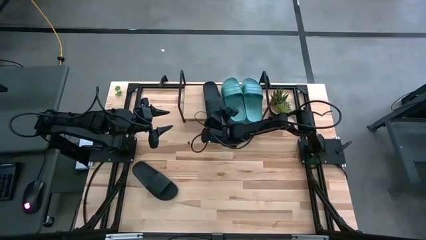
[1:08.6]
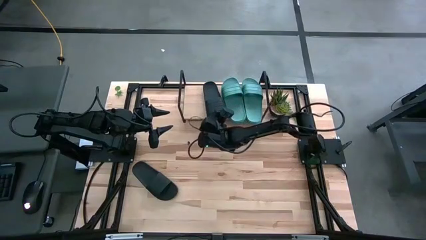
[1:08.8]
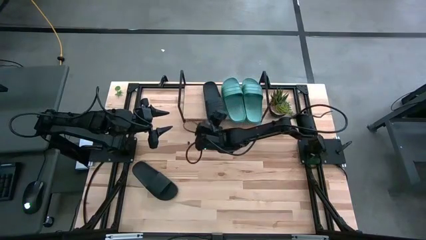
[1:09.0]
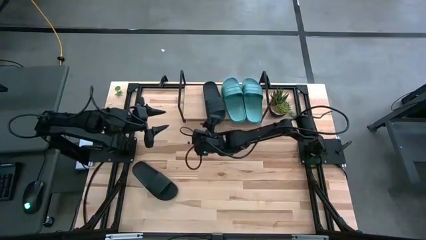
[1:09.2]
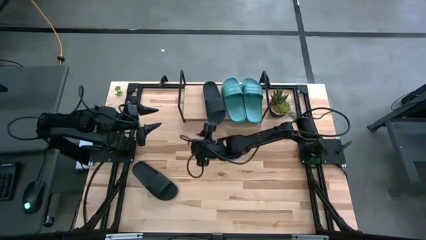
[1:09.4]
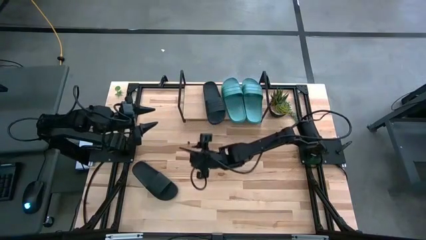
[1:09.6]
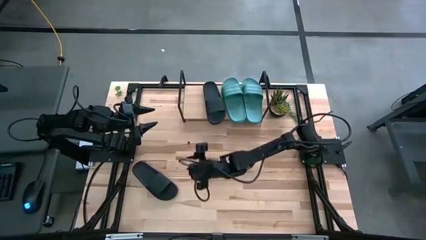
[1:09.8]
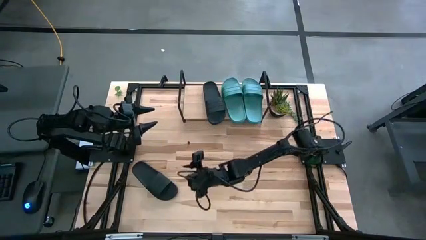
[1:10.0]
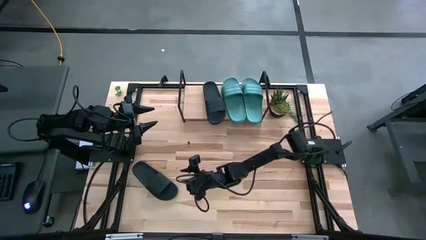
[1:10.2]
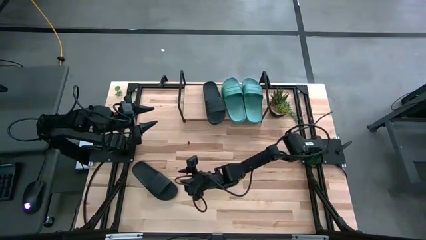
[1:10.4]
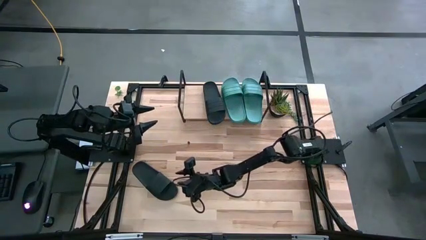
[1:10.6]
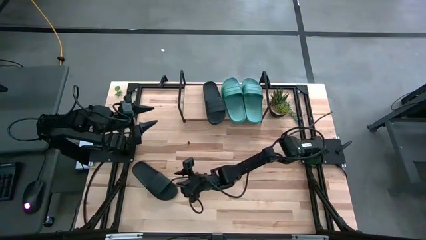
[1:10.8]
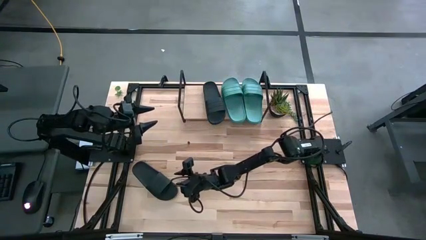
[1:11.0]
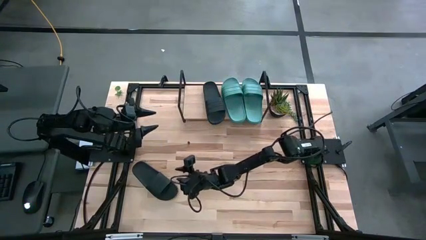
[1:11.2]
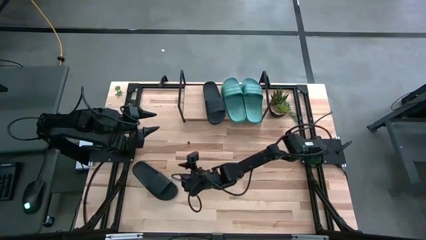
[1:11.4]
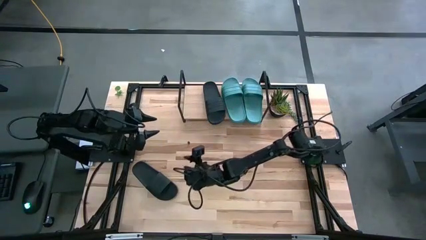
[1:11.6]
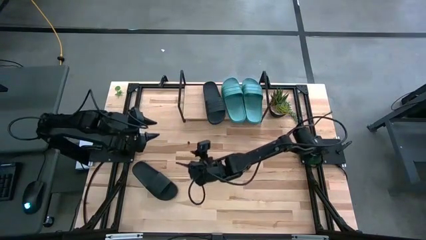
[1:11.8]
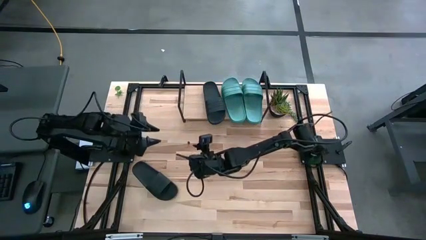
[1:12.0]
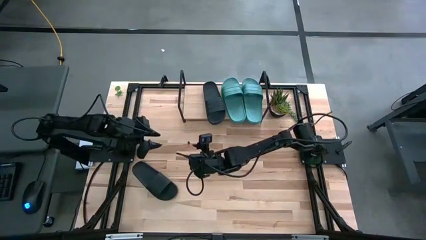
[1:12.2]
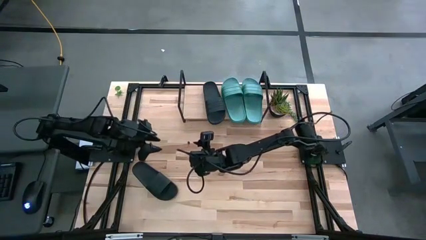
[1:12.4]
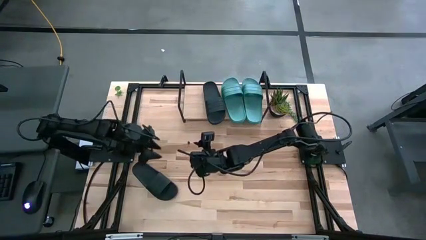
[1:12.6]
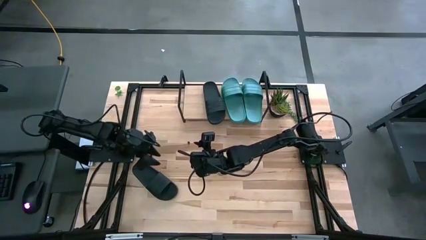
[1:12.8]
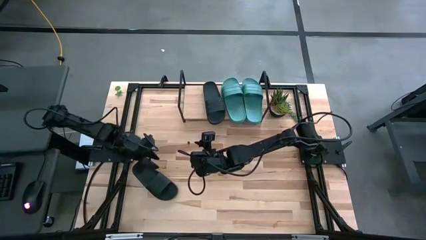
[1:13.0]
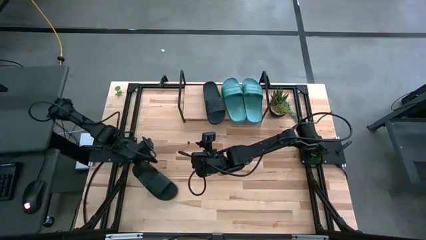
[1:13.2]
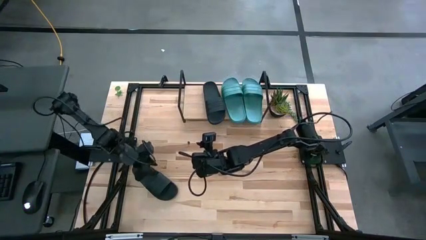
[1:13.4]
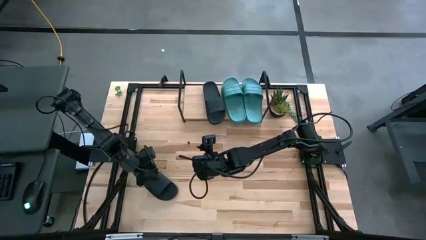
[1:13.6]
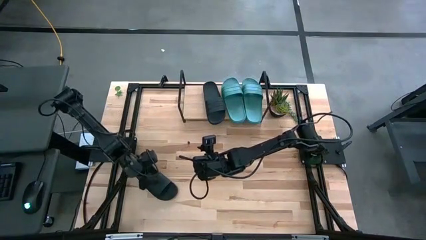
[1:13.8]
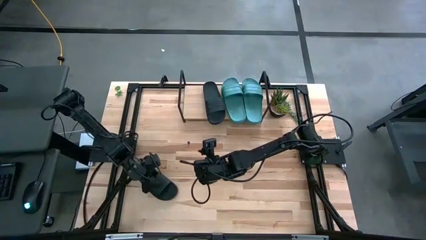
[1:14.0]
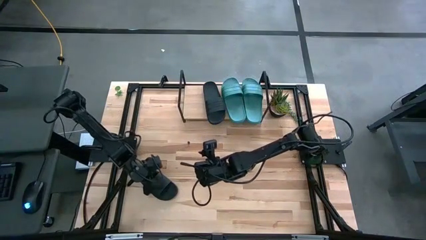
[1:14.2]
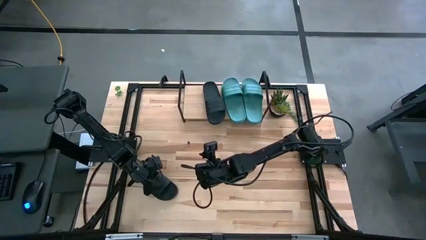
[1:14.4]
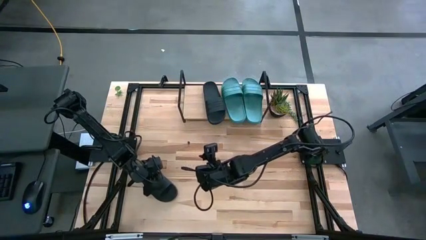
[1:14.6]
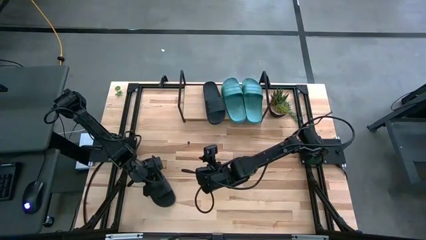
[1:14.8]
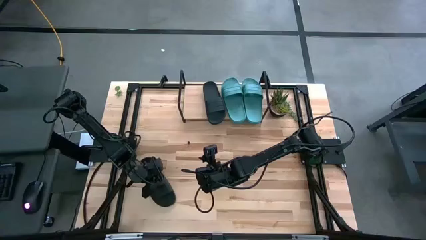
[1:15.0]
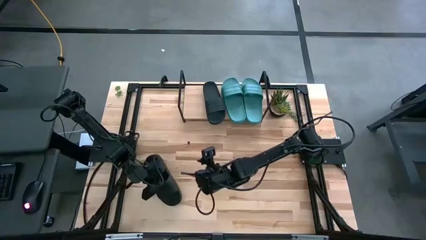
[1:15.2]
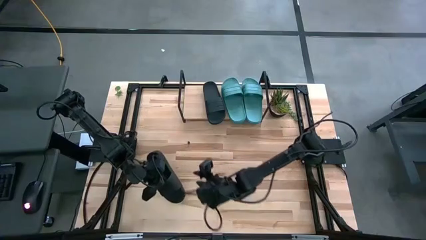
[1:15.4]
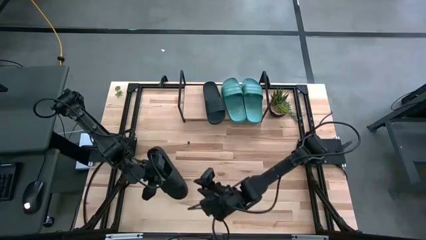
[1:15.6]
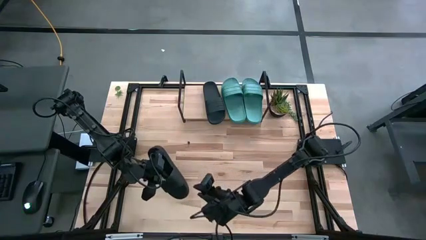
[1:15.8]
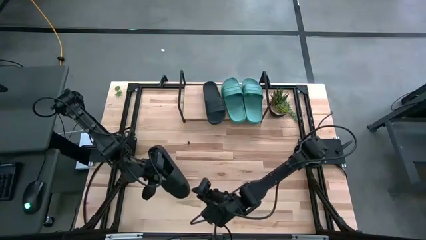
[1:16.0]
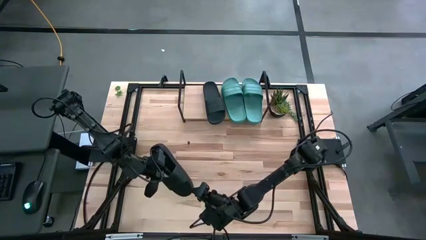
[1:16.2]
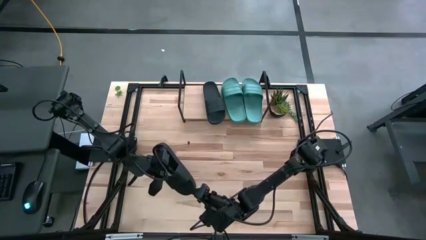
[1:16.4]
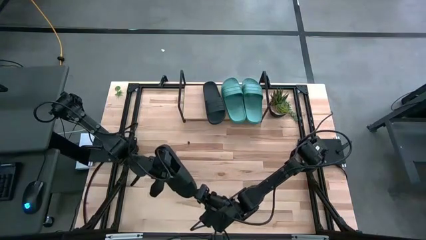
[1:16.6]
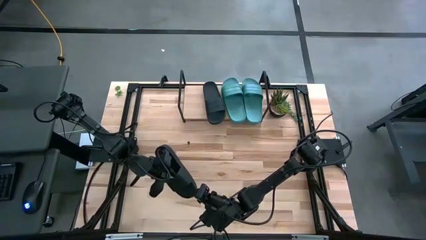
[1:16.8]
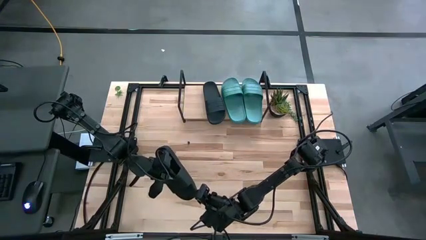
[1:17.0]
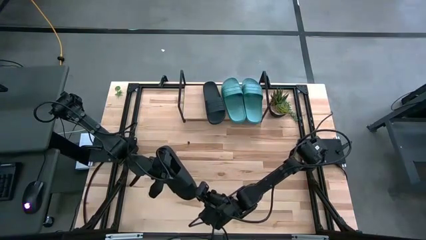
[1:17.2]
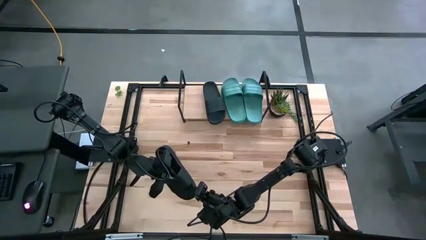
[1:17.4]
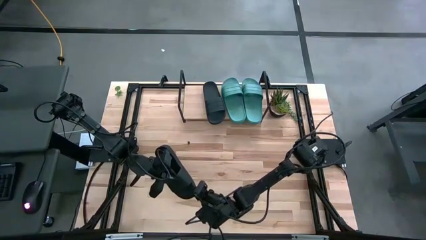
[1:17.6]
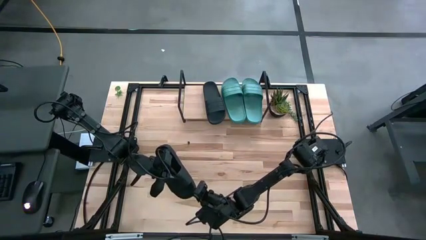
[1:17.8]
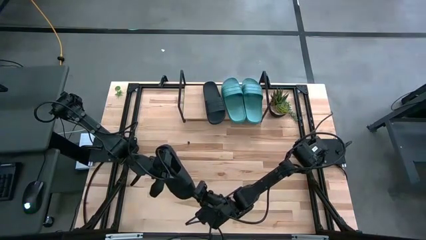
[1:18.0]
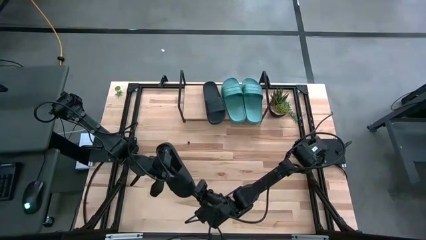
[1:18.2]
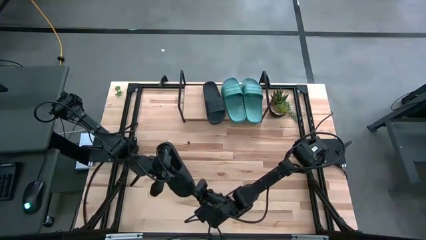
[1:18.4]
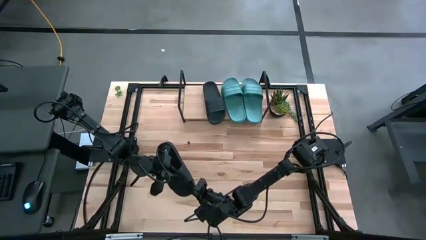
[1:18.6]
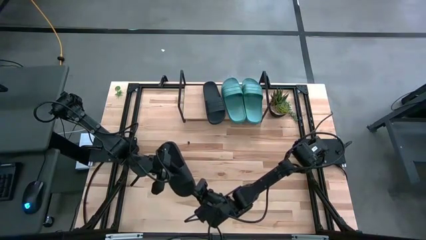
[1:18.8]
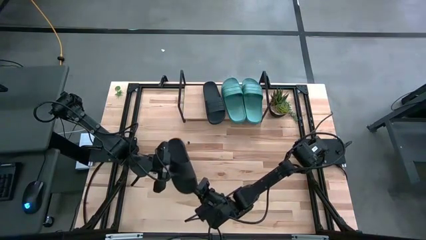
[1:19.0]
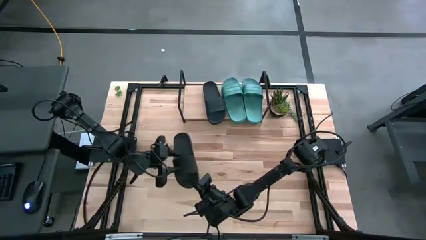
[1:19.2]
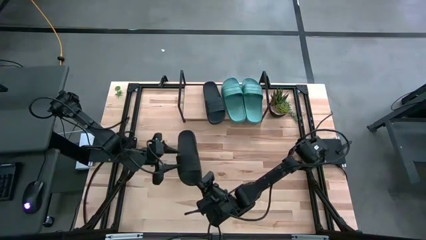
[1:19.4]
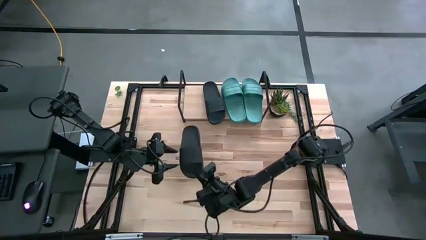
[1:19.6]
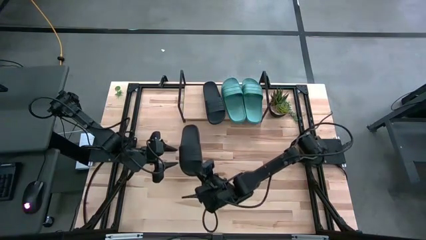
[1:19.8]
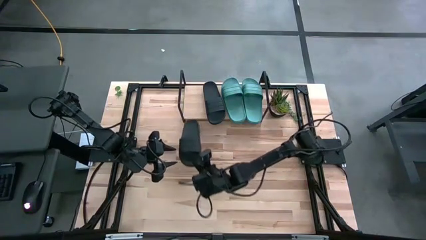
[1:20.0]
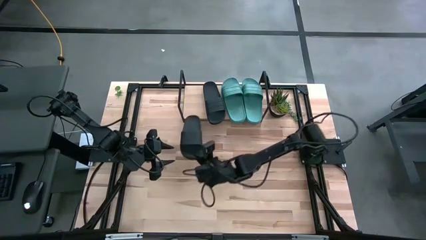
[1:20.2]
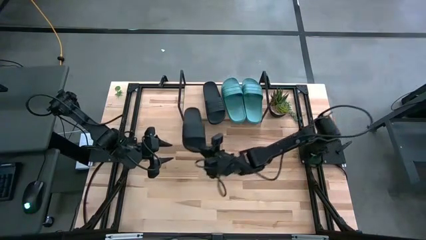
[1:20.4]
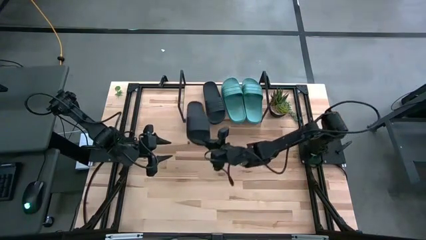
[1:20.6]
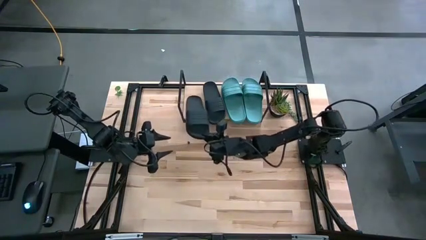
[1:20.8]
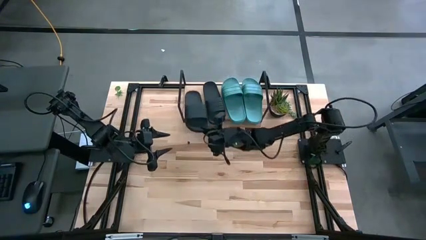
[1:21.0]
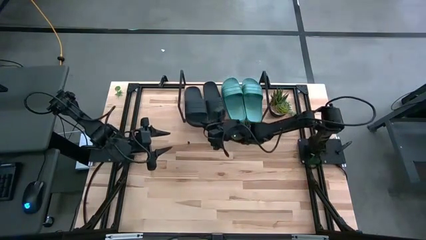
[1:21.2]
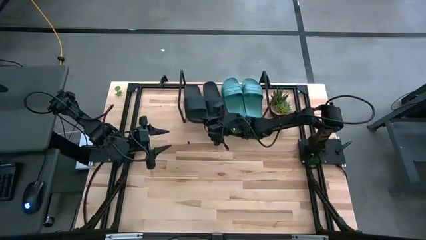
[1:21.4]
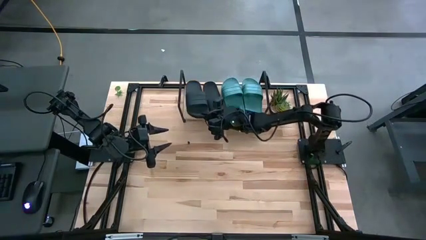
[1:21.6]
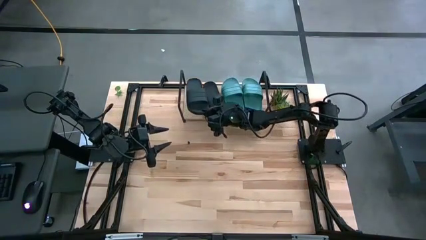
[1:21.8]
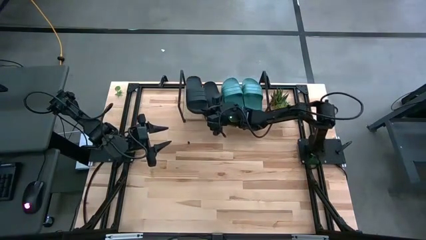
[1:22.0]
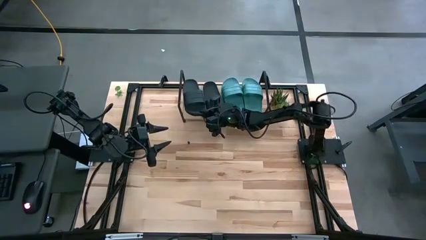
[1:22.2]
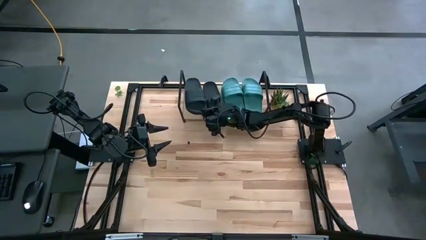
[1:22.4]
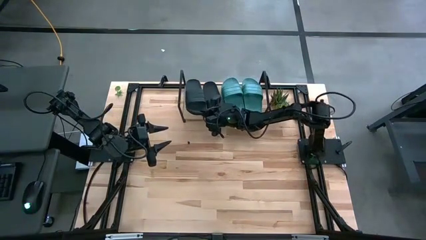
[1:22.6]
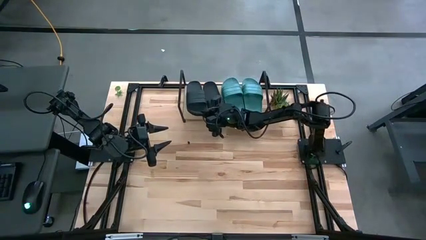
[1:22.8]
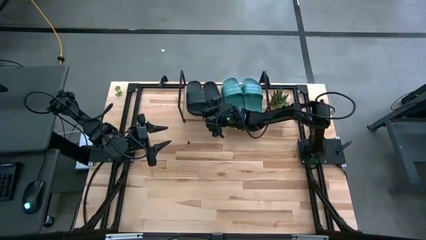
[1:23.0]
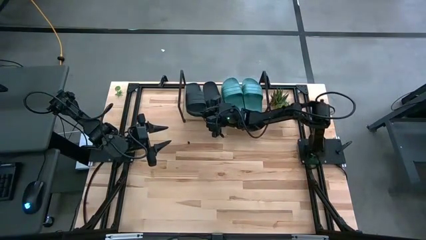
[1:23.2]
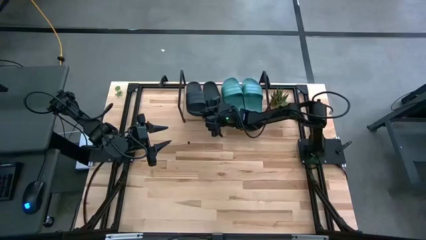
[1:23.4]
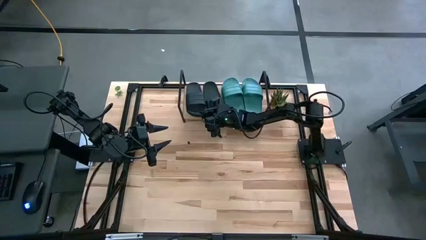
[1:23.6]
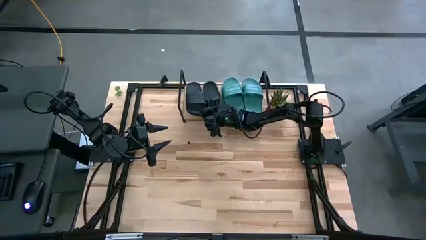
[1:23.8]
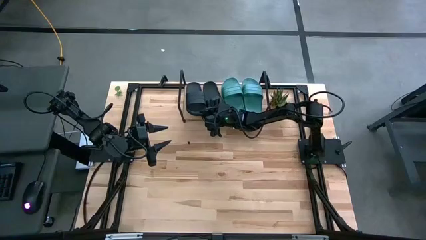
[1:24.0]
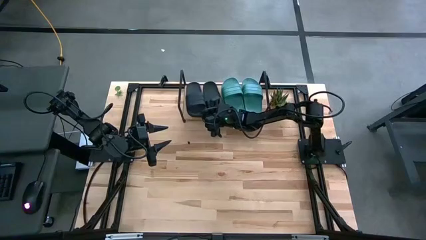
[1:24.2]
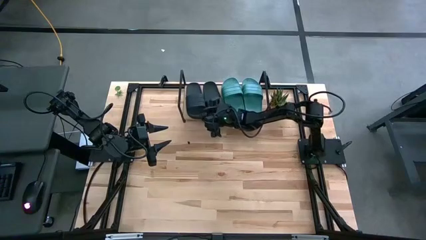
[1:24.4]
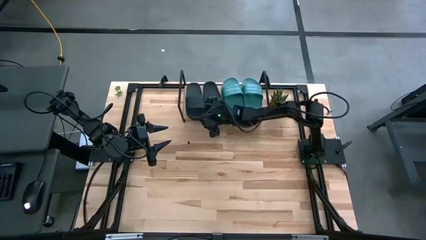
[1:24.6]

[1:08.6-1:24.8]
Task: Pick and place slides into the shelf
Put the black slipper on the shelf
